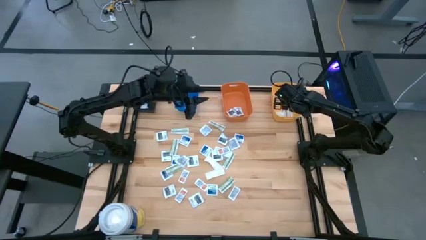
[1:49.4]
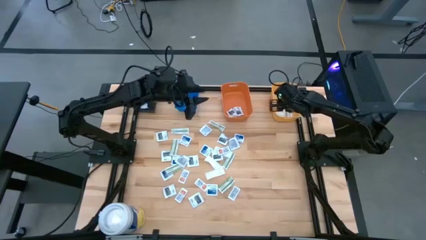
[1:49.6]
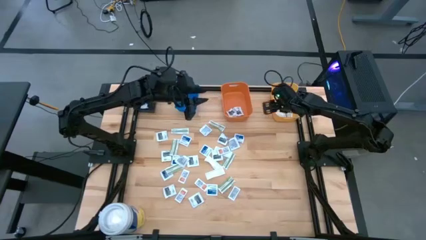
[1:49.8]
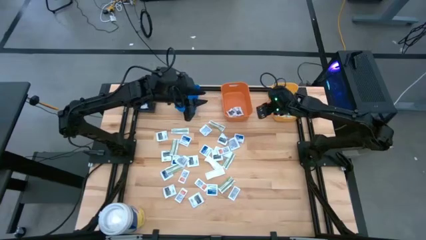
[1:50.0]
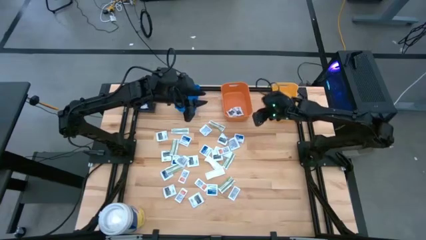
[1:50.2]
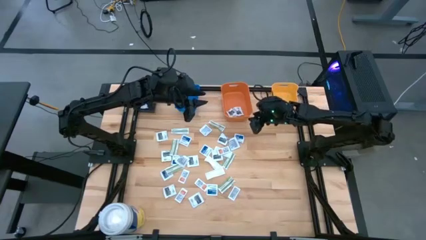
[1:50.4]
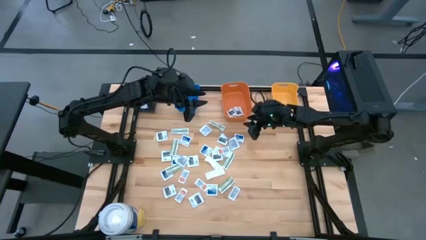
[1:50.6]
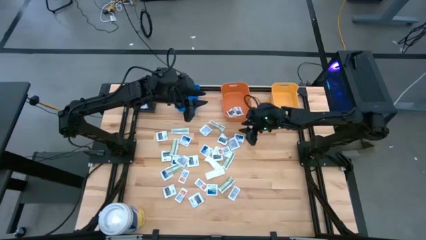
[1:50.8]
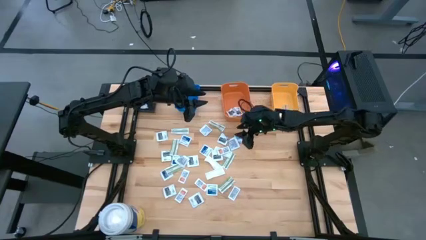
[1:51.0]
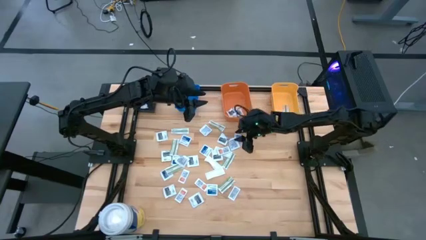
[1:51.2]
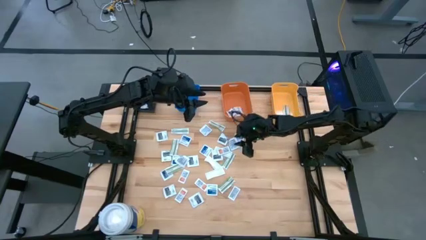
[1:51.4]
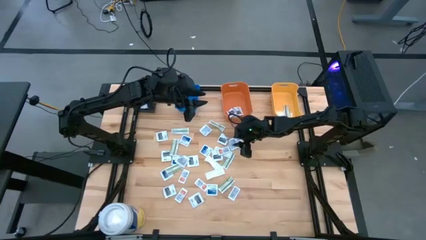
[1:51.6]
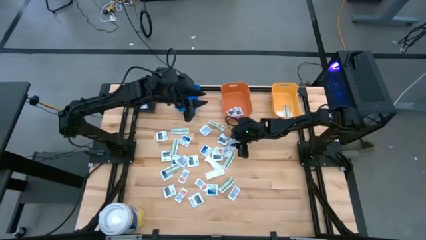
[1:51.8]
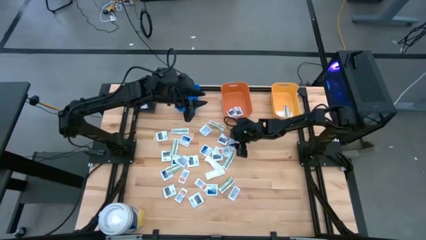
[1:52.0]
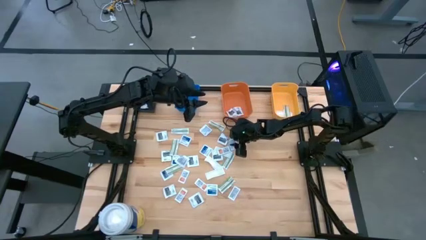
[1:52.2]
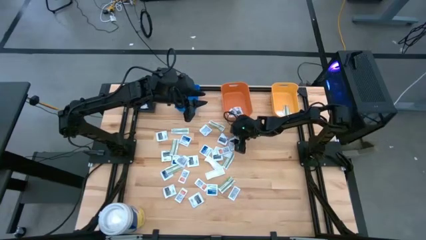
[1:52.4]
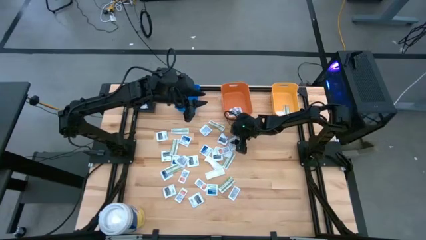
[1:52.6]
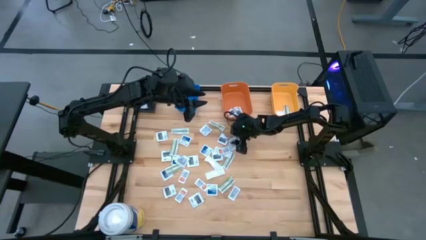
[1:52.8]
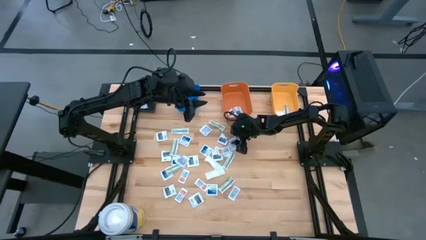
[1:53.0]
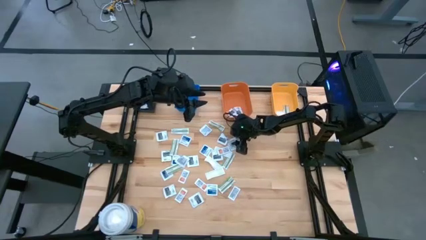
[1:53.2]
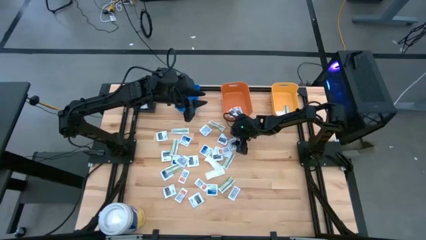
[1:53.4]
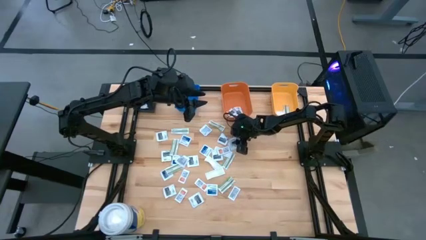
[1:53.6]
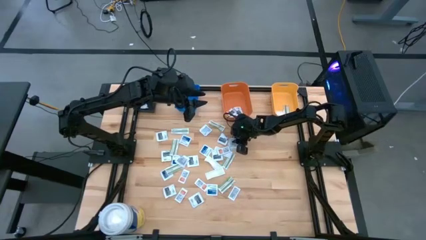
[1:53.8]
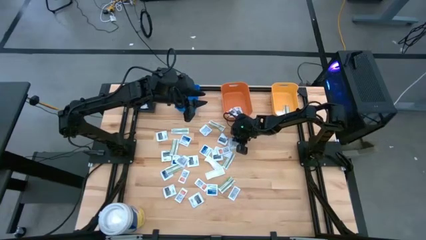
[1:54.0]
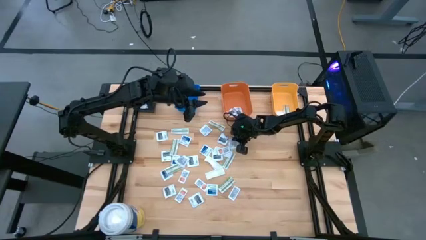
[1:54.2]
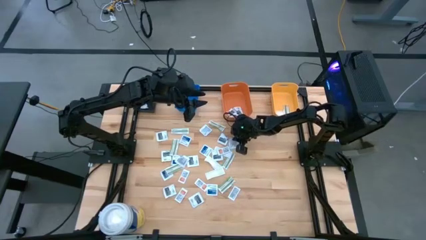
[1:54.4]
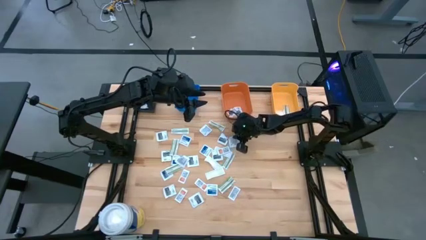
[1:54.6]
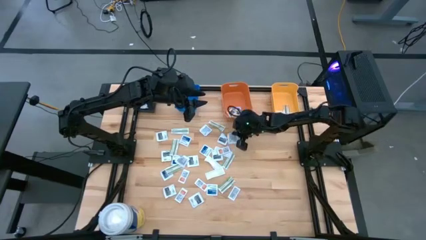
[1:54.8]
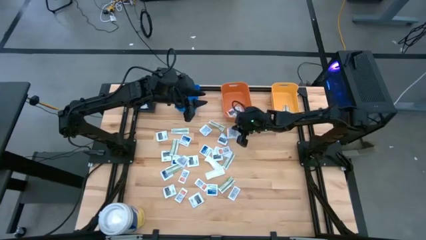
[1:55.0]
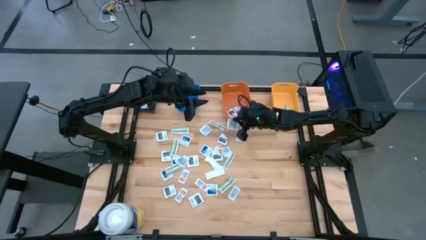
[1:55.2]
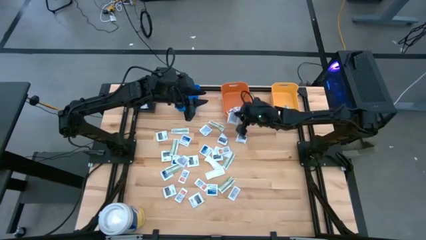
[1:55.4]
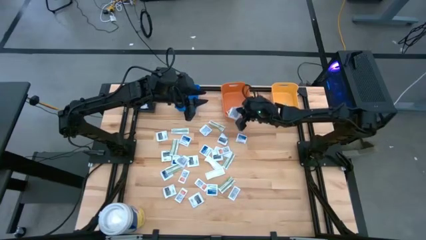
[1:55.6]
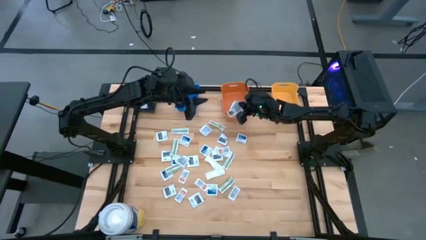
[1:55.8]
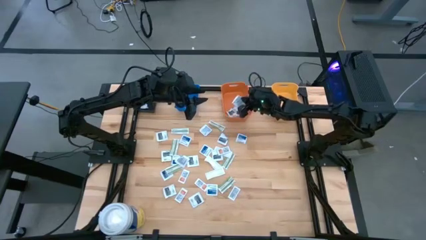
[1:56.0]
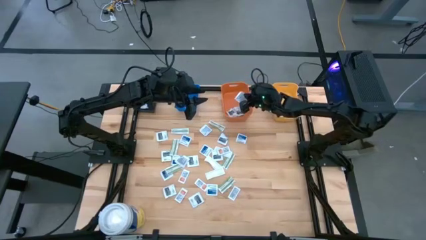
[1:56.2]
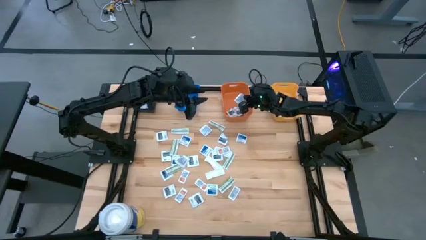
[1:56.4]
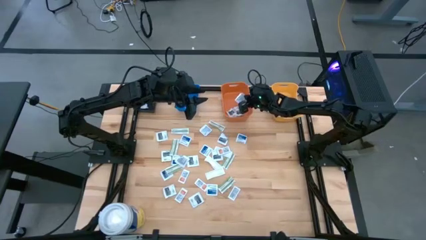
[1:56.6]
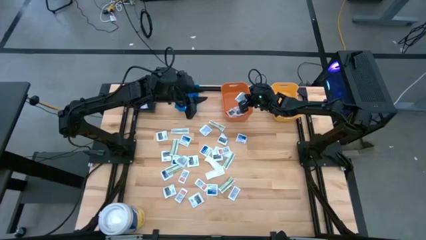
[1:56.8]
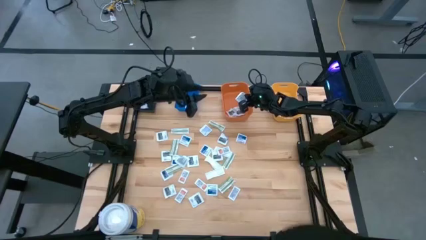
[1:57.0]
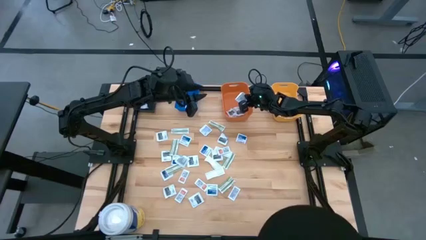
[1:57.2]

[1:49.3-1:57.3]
Task: Pick & Place First Aid Supplies
Put the towelette pack into the orange bin

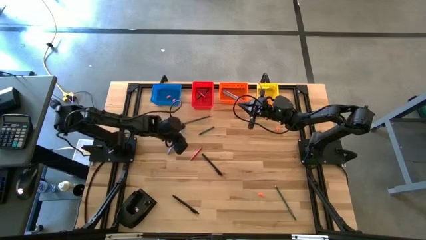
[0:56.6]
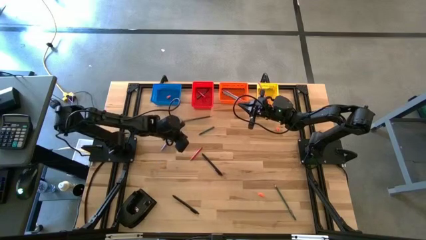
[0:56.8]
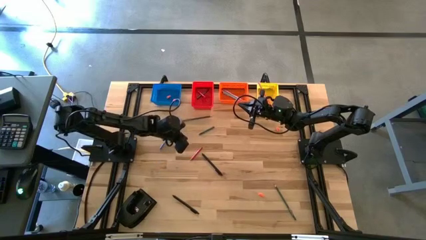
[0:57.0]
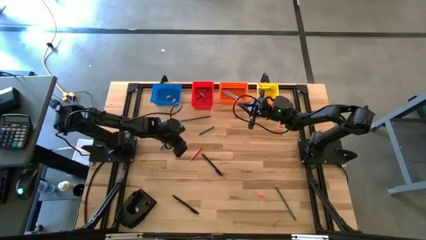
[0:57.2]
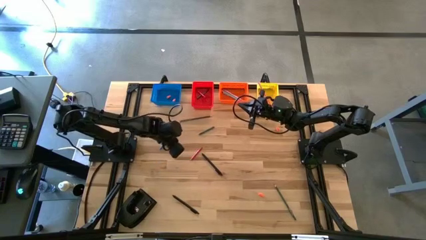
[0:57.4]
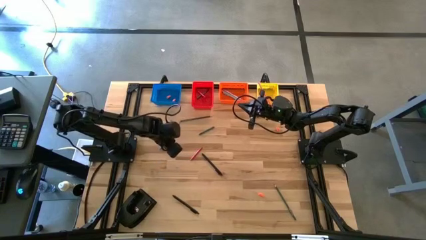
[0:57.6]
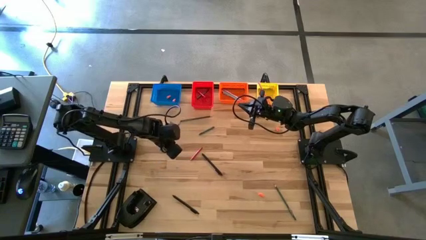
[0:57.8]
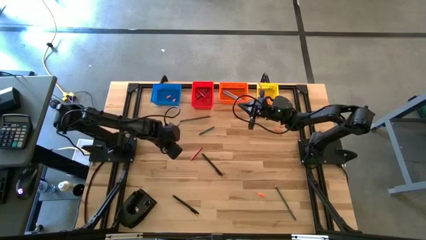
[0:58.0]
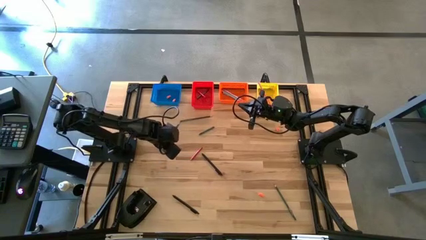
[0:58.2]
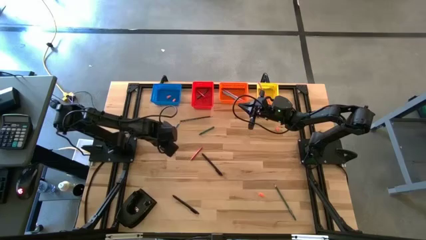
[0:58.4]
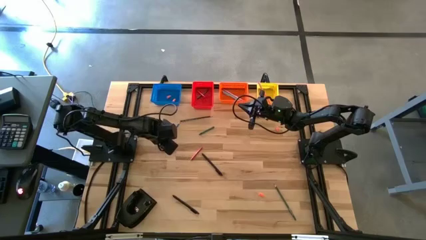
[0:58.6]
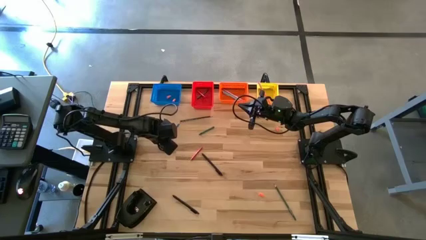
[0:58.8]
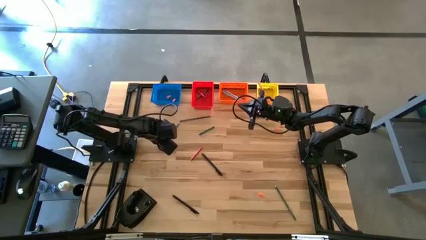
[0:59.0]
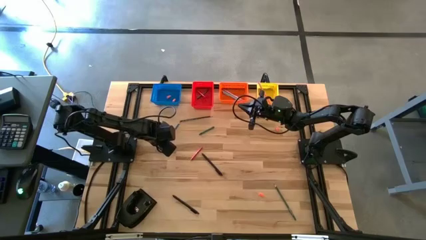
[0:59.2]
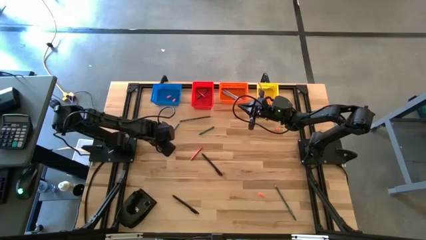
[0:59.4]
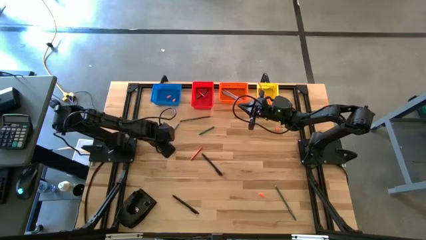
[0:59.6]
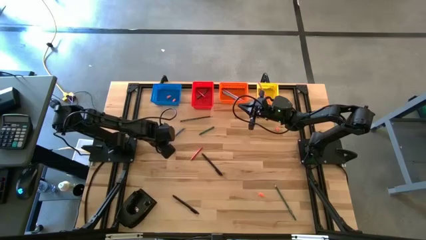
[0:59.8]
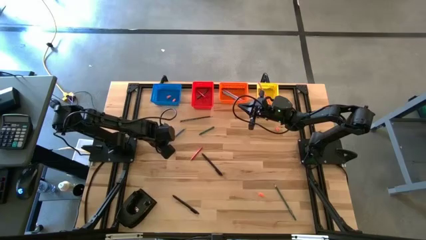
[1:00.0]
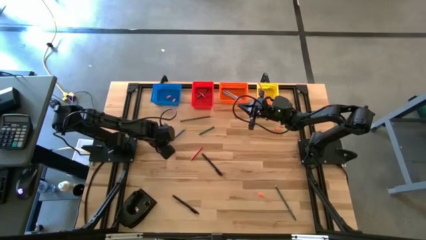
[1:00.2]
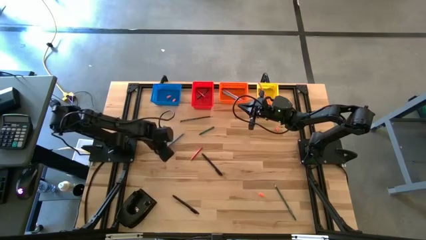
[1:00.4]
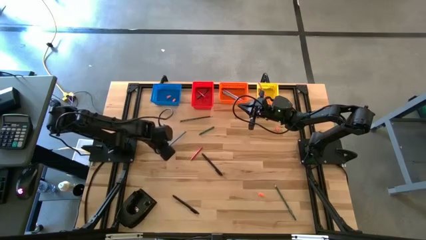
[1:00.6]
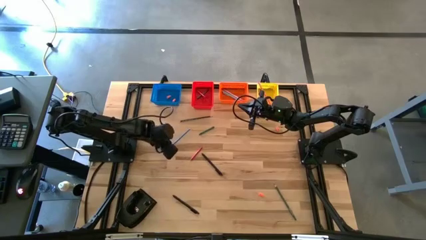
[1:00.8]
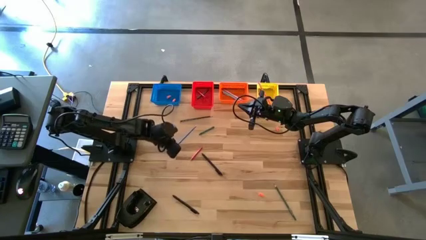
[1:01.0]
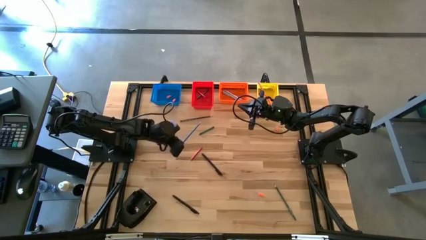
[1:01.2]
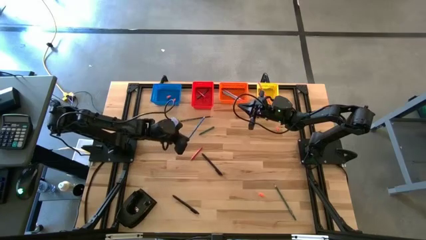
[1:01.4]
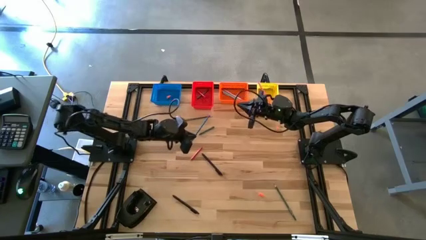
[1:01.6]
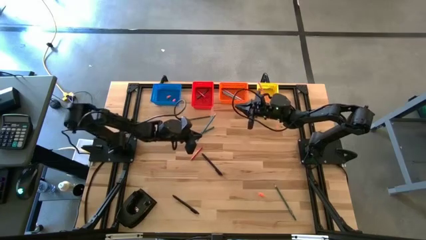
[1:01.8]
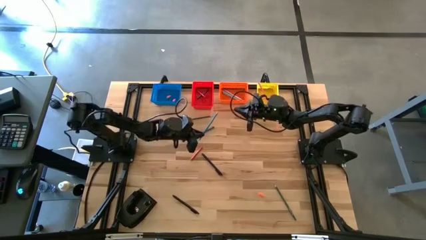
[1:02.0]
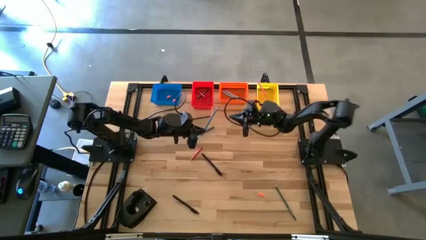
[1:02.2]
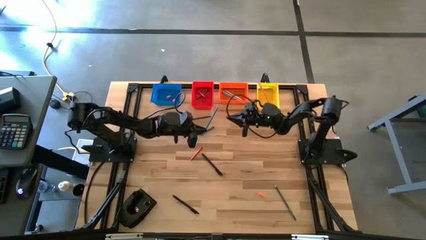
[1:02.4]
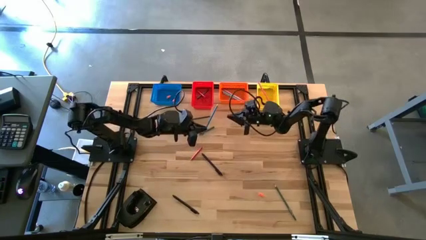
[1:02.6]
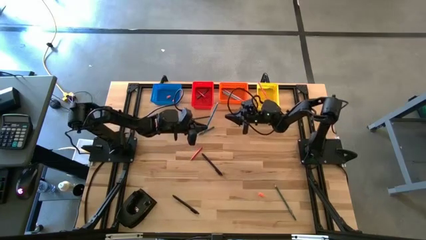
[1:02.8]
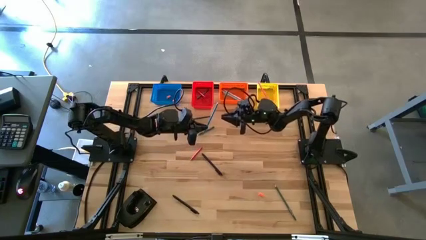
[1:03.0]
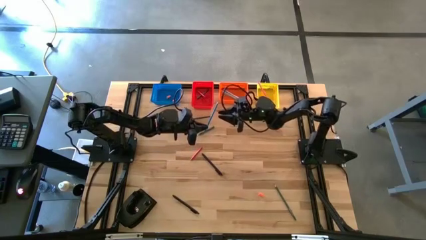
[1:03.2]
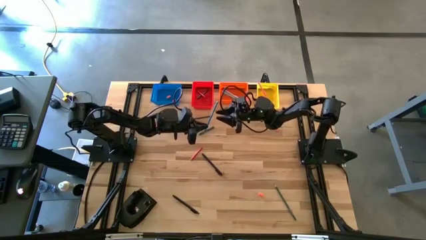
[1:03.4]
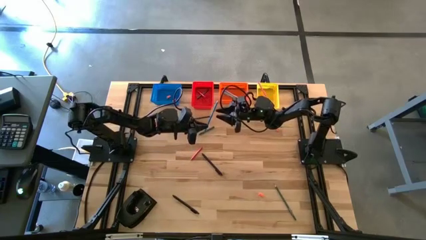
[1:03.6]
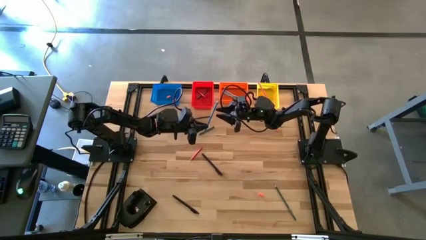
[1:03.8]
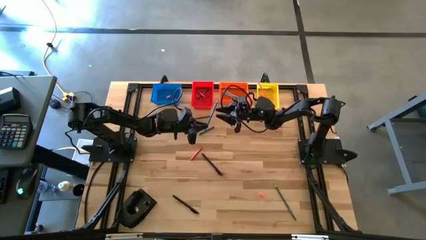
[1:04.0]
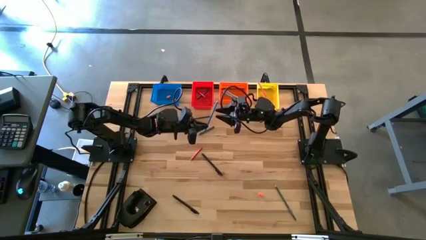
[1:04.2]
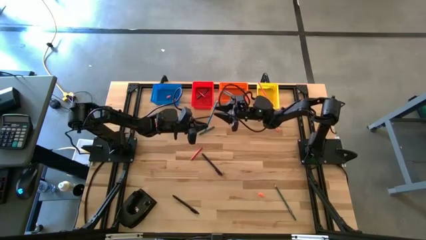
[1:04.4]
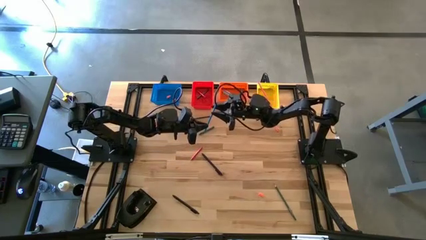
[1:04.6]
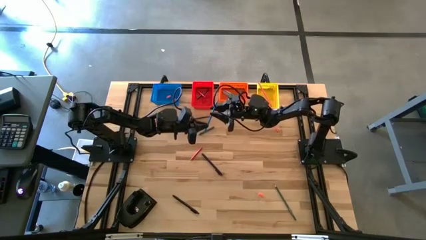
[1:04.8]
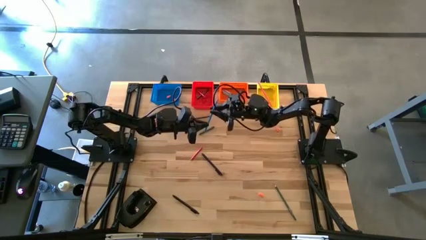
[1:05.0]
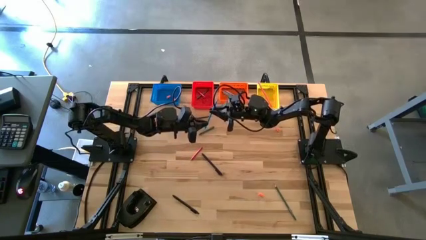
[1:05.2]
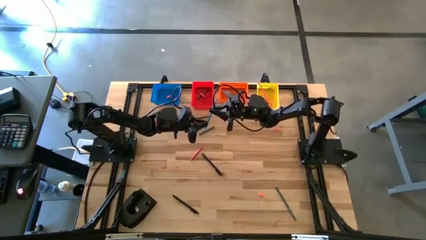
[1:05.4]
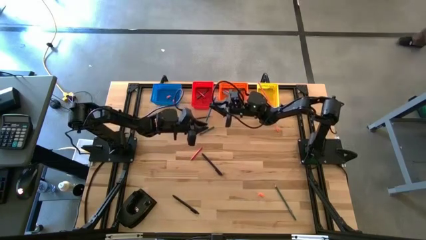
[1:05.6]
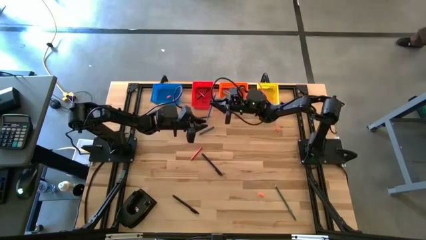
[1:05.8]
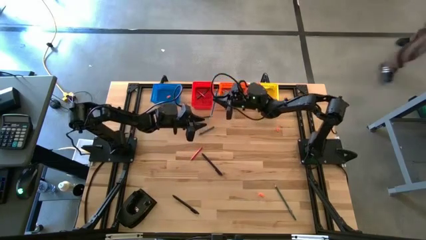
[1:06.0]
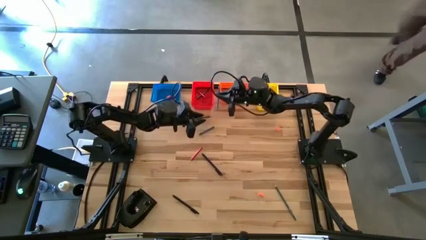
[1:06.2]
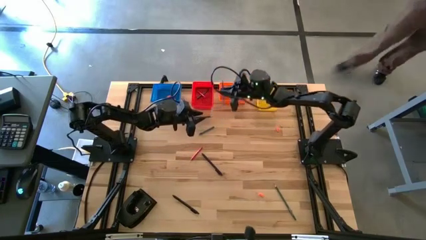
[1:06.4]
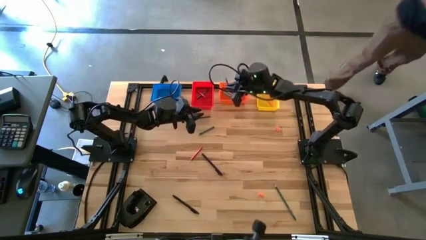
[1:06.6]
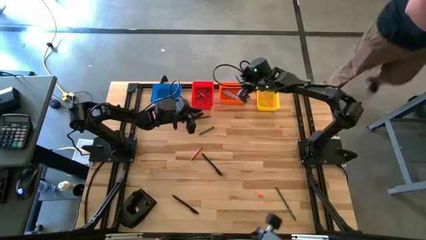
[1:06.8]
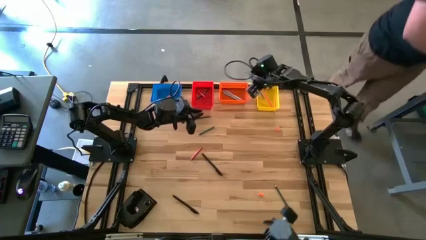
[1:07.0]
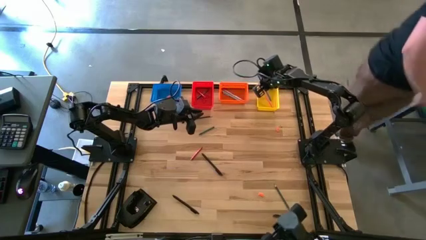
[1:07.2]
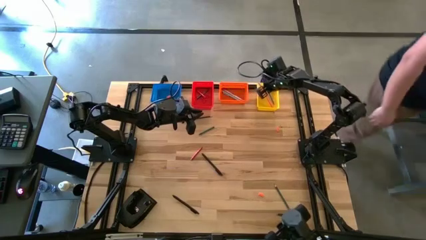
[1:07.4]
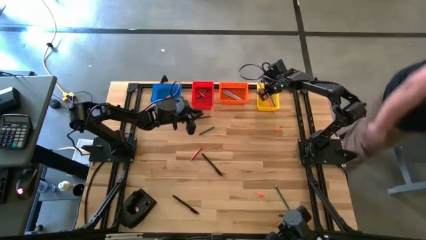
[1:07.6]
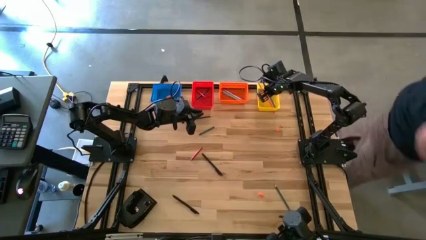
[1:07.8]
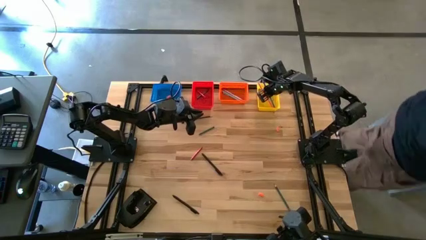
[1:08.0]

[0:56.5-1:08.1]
Task: Sort crayons/erasers/pens/pencils in bins
Put the blue colored pencil into the yellow bin
